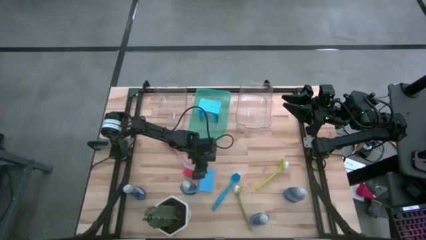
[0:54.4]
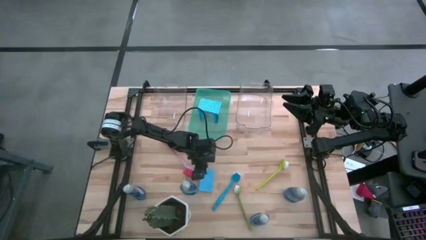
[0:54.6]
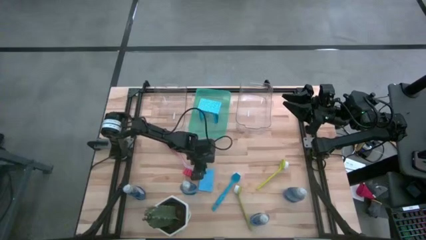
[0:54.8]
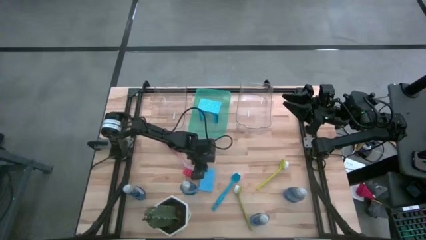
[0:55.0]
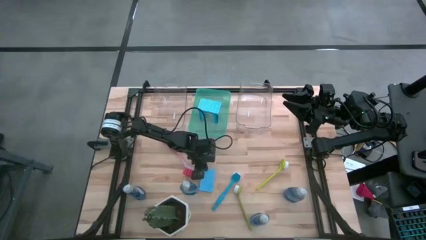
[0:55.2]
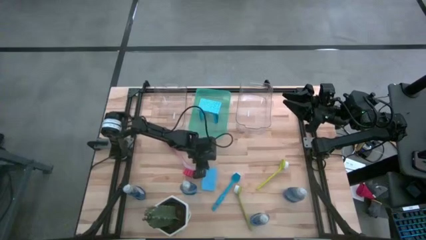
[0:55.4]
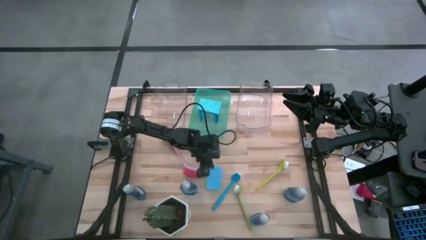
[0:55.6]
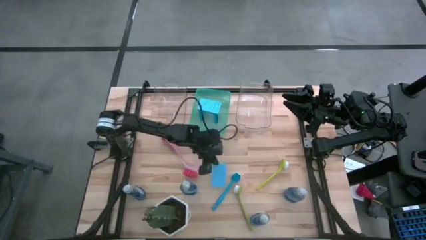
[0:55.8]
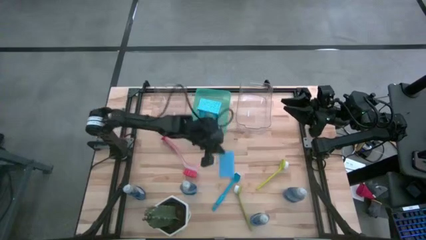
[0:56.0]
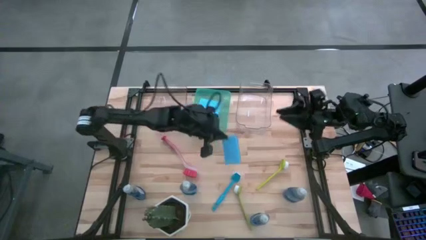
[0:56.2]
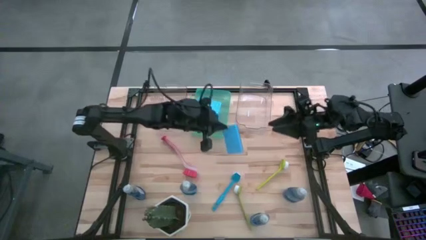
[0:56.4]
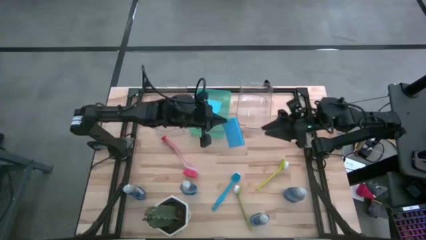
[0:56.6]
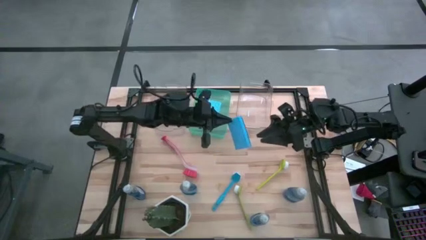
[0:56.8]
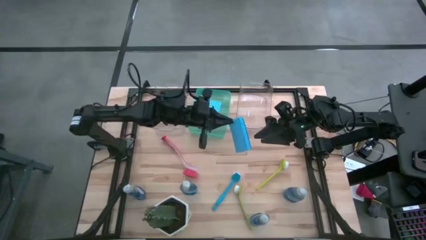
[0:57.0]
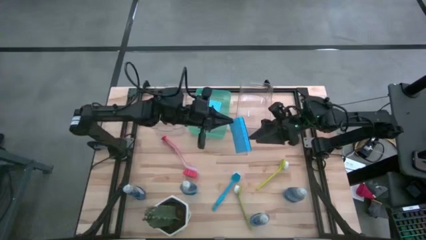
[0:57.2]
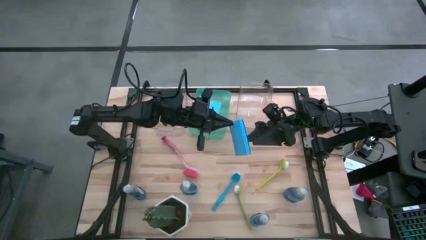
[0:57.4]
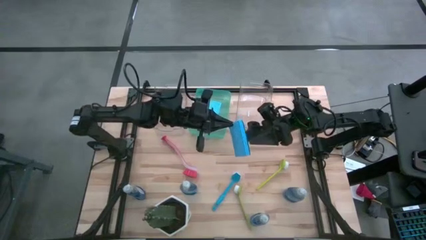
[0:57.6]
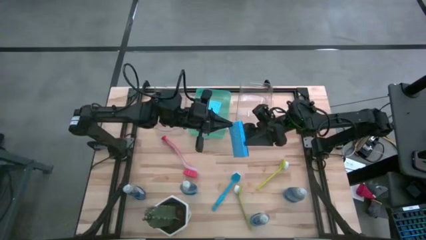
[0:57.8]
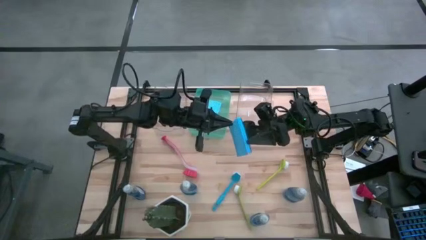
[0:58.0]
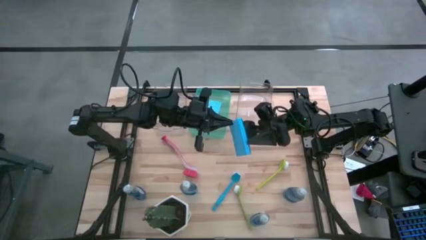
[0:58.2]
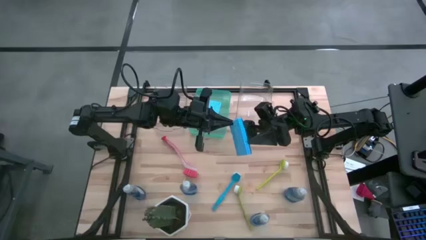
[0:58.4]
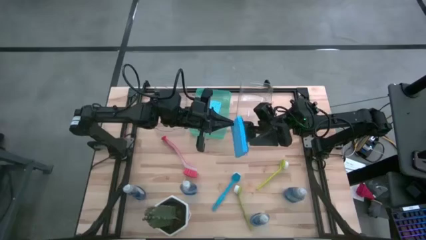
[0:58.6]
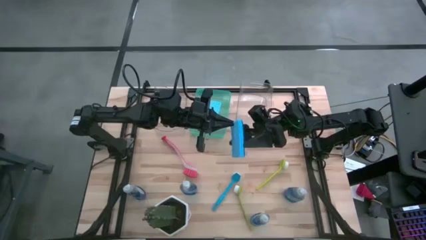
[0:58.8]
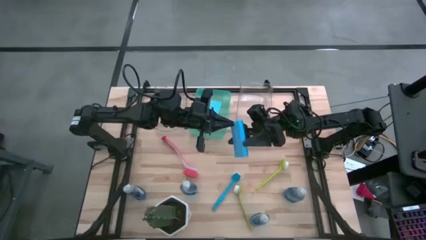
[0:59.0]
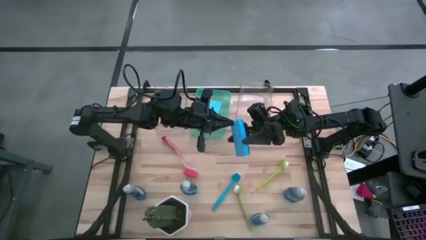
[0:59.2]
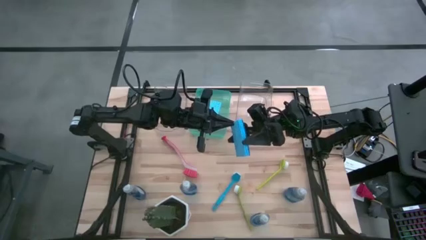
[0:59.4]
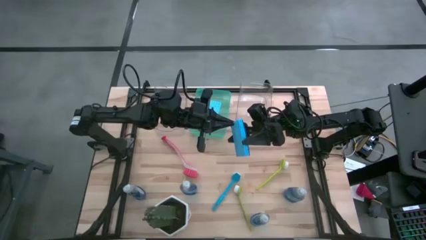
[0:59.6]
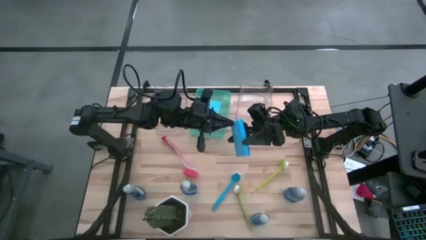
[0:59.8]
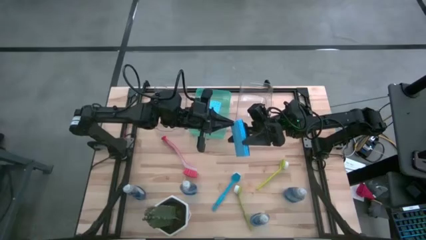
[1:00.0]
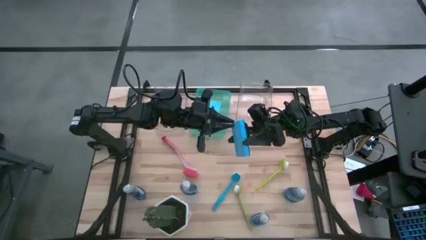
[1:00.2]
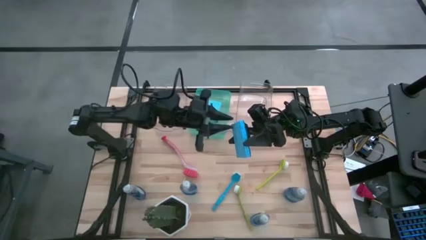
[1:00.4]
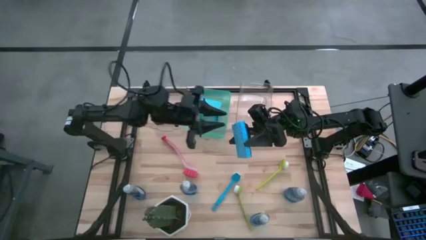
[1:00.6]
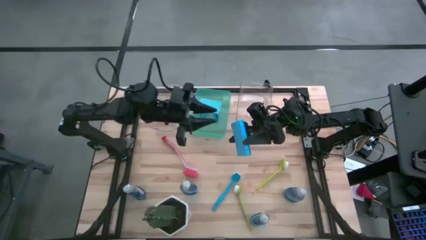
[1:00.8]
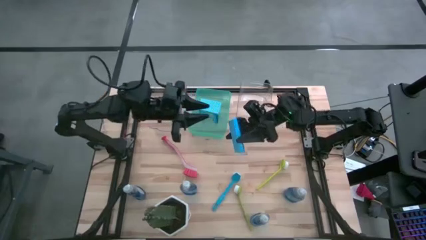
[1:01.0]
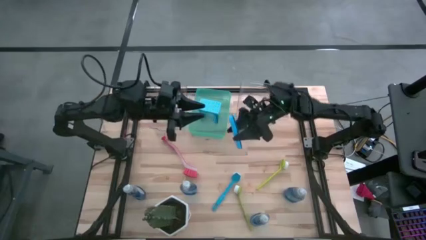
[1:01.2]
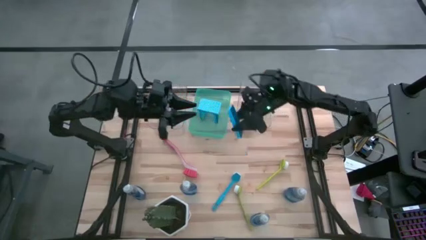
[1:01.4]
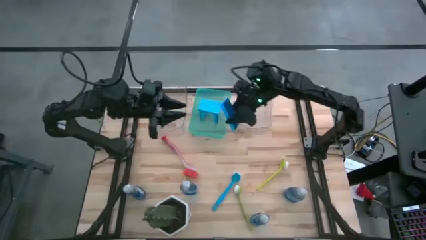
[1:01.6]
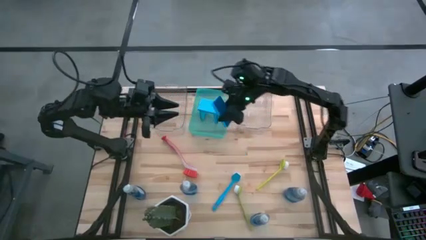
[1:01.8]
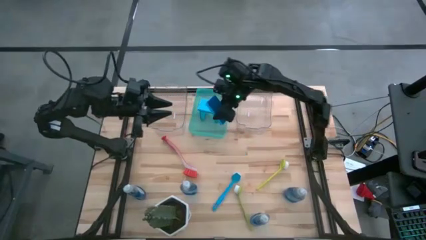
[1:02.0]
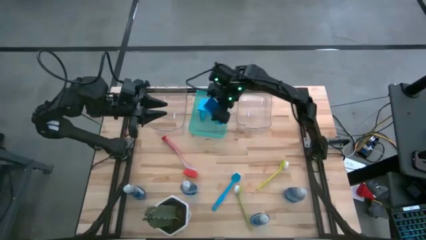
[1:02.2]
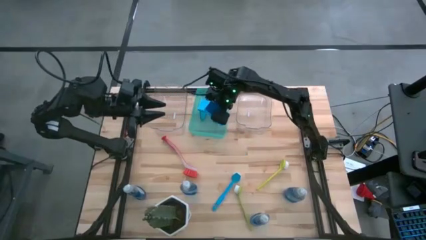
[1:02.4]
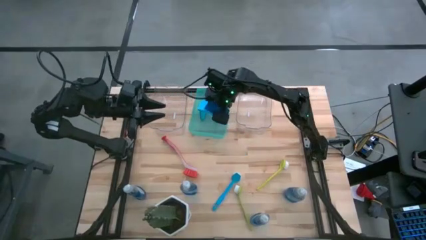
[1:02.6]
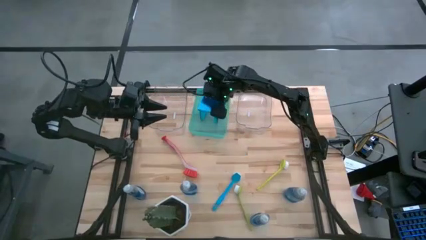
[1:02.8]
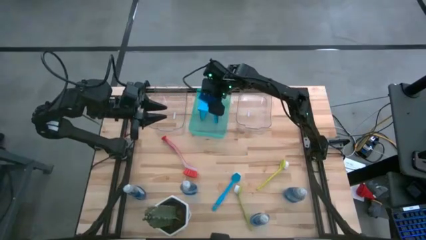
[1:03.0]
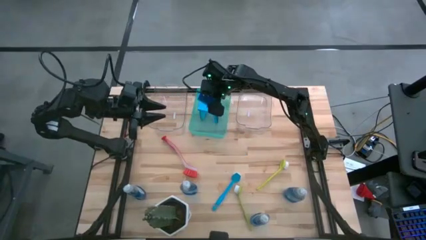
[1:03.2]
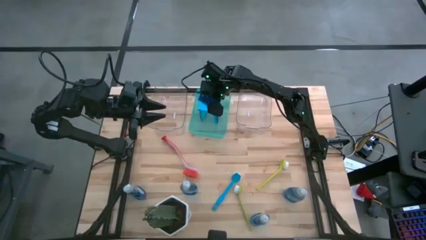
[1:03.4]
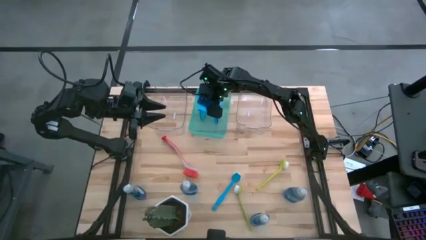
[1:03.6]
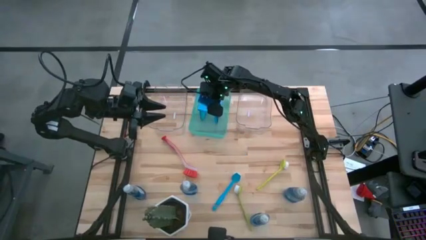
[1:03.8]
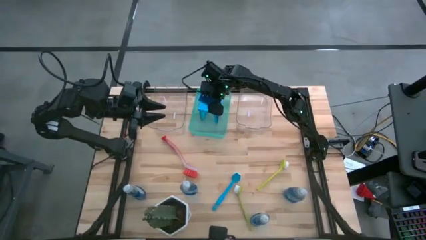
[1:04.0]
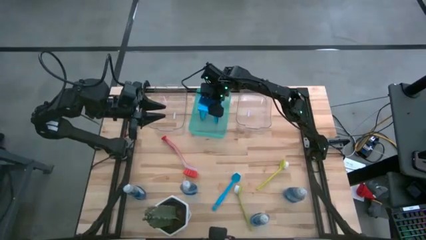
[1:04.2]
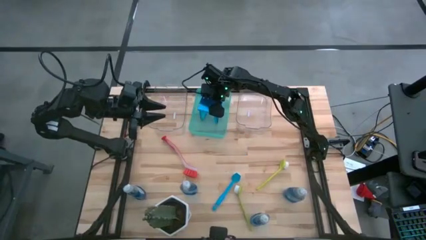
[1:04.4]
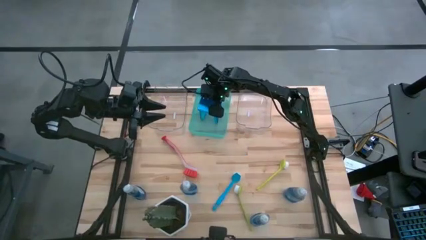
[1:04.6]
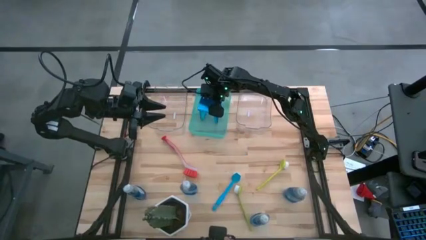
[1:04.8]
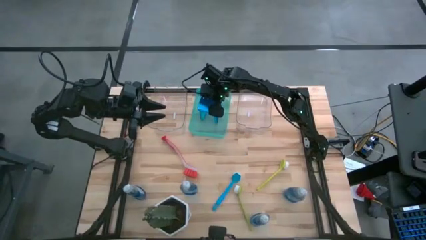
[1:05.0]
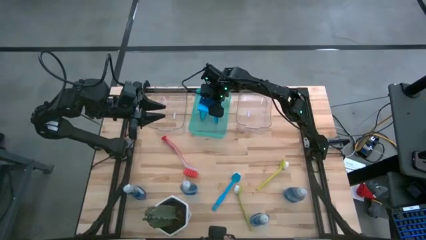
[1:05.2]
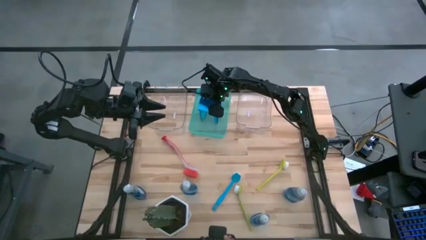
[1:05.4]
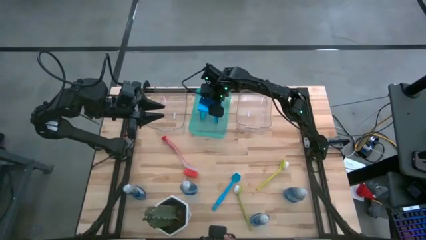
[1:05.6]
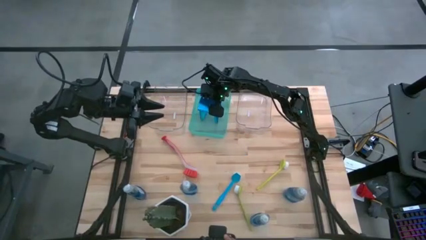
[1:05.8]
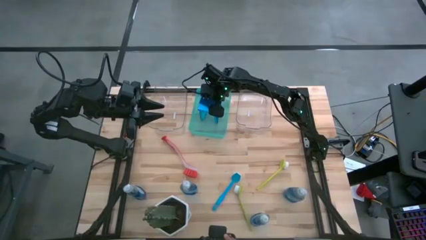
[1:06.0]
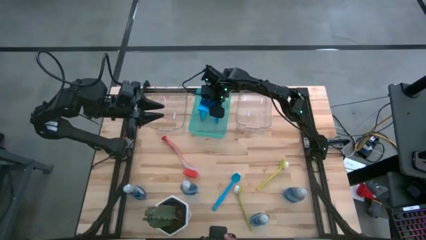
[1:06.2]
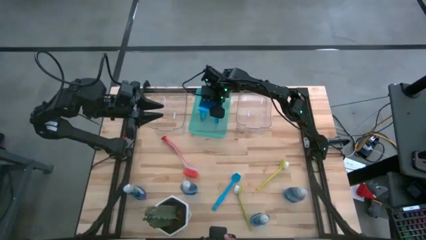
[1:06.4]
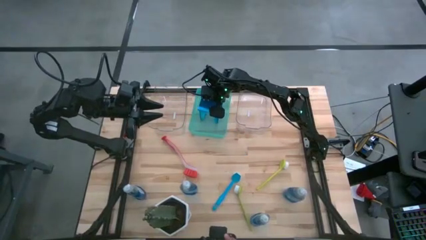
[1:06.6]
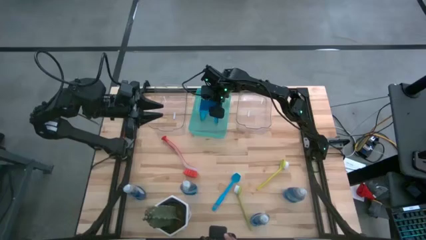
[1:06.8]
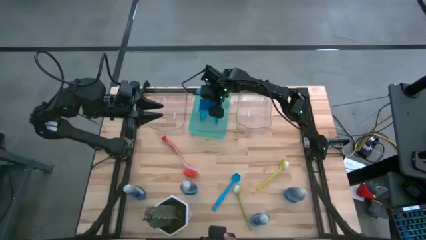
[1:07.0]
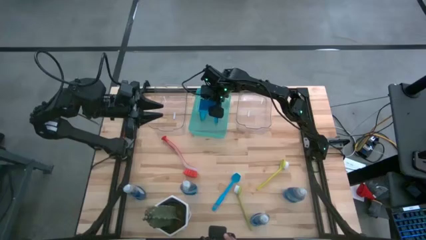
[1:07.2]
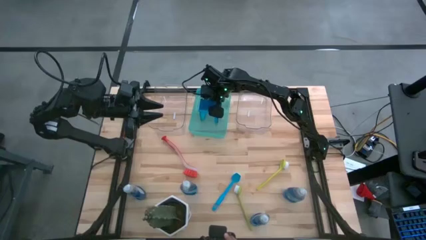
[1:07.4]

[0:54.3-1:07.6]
Task: Pick & Place Kitchen Sink Supplies
Put the sponge into the green bin
